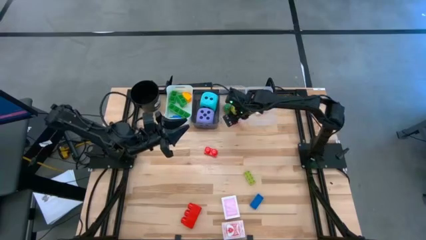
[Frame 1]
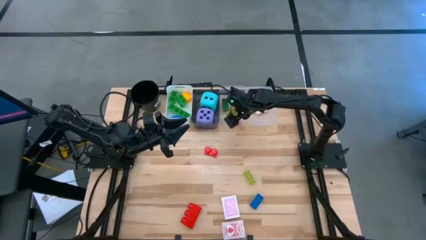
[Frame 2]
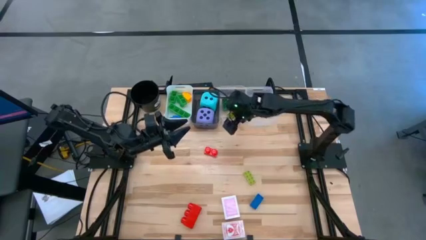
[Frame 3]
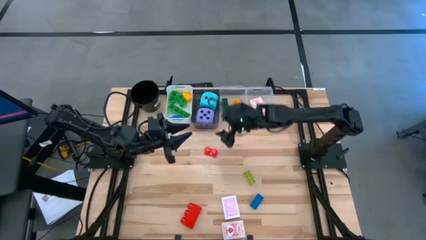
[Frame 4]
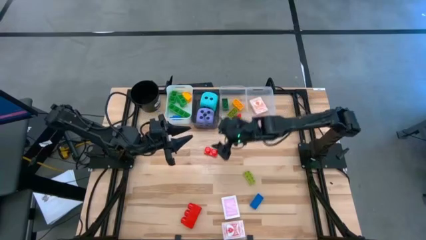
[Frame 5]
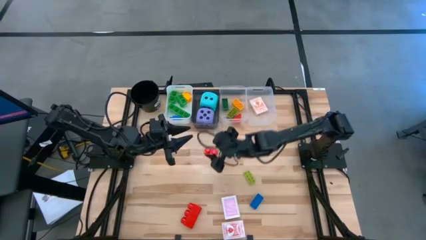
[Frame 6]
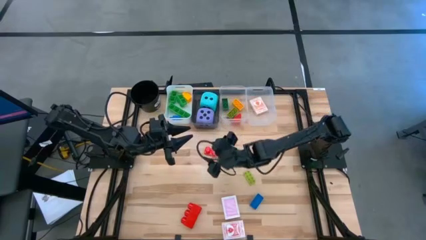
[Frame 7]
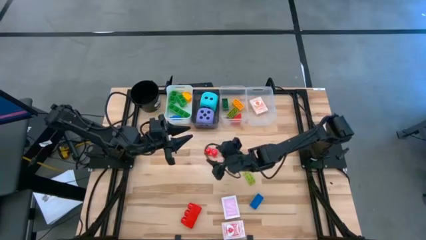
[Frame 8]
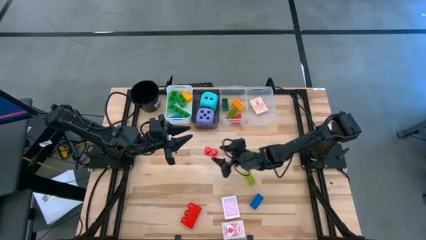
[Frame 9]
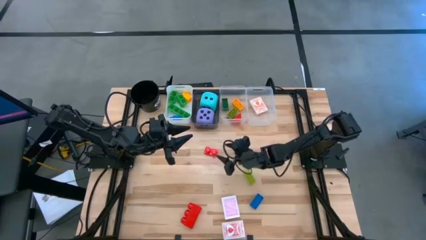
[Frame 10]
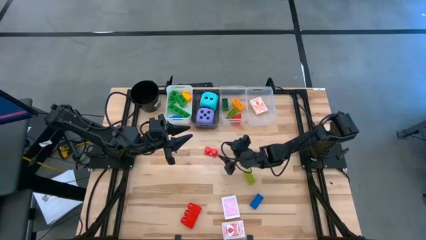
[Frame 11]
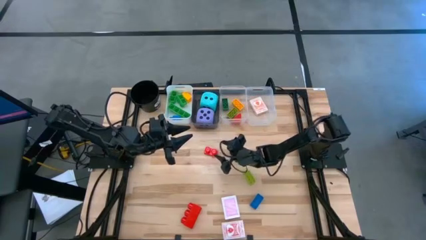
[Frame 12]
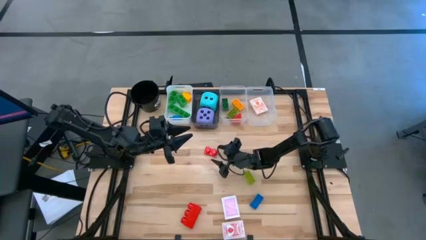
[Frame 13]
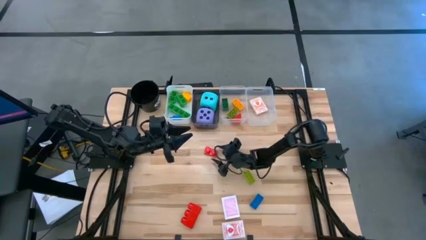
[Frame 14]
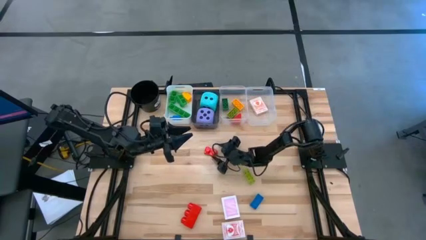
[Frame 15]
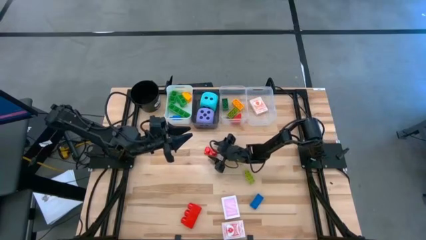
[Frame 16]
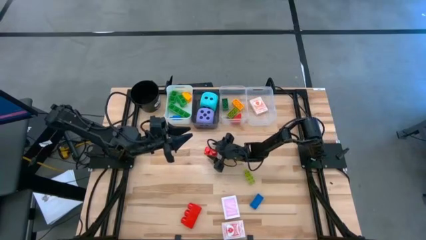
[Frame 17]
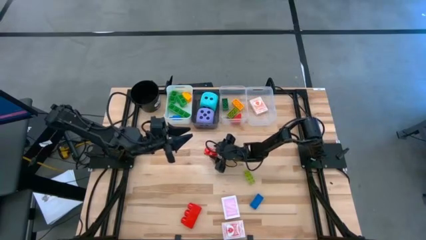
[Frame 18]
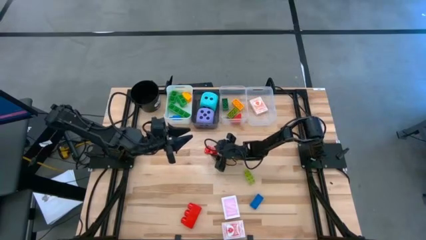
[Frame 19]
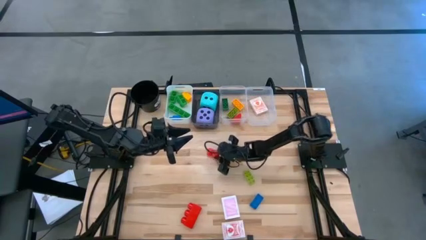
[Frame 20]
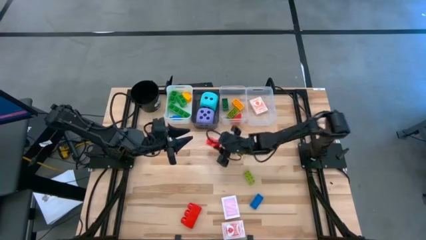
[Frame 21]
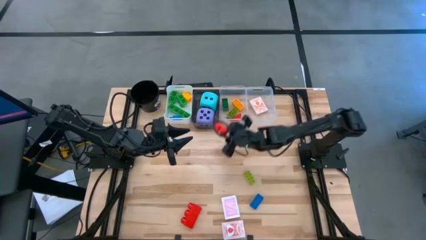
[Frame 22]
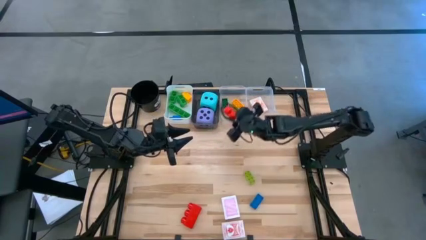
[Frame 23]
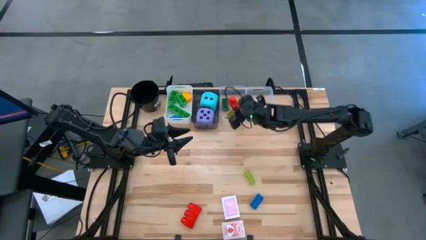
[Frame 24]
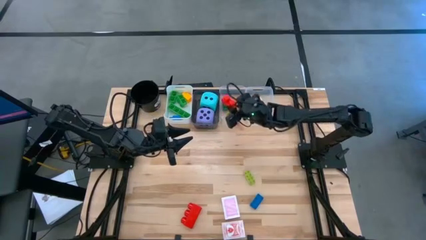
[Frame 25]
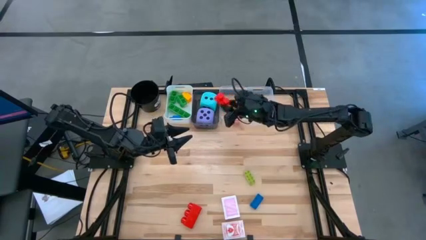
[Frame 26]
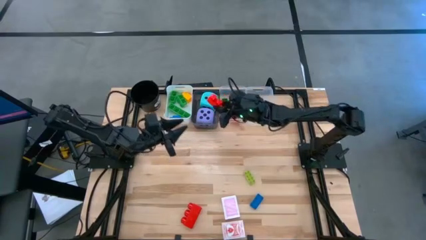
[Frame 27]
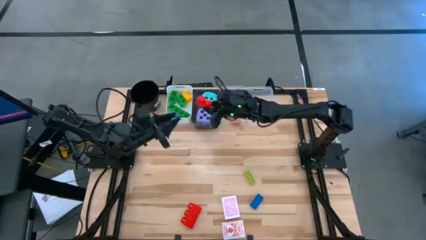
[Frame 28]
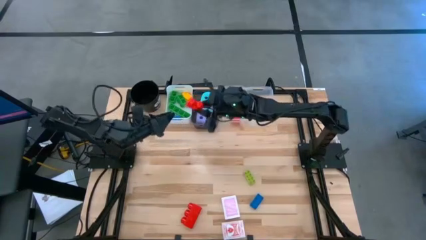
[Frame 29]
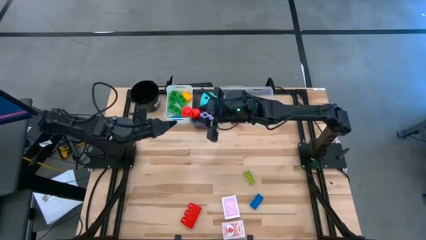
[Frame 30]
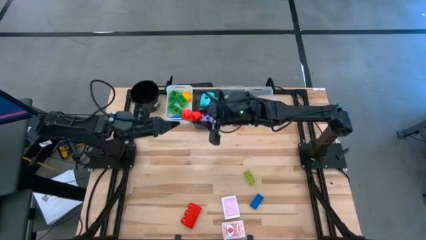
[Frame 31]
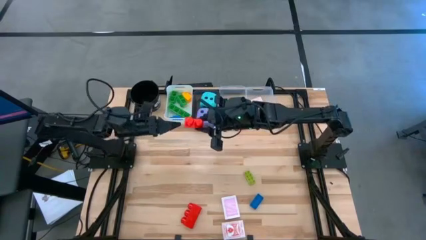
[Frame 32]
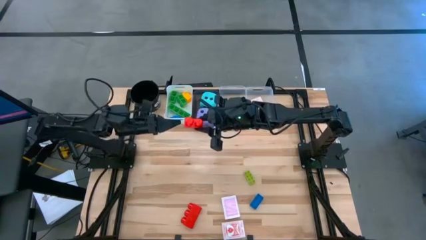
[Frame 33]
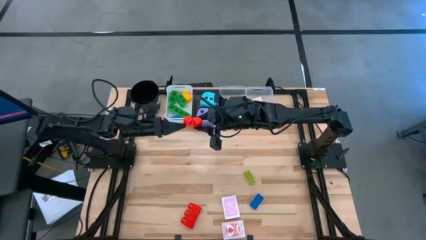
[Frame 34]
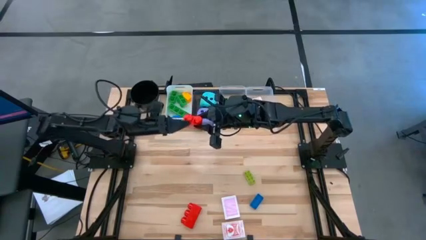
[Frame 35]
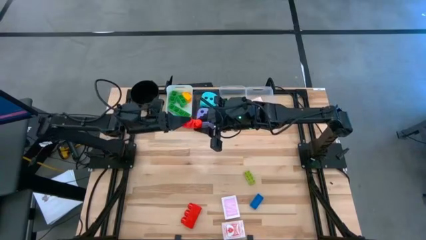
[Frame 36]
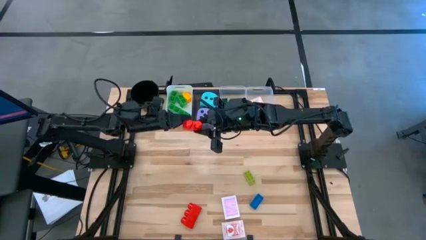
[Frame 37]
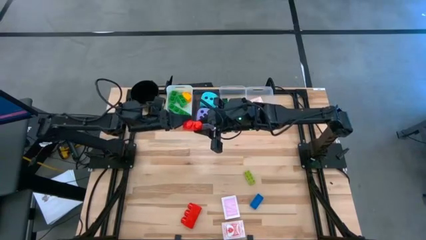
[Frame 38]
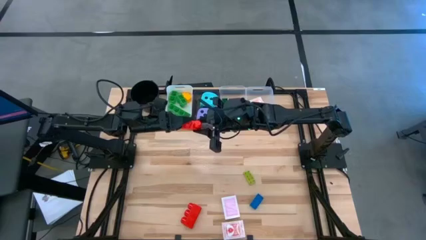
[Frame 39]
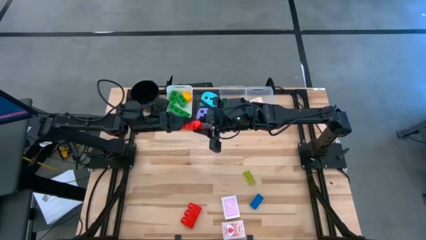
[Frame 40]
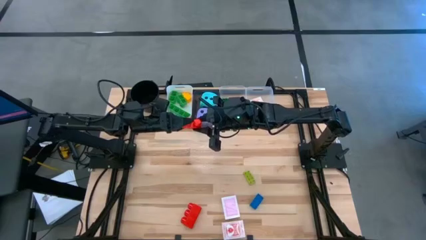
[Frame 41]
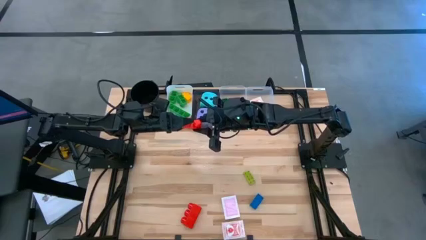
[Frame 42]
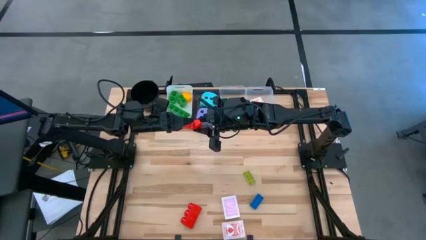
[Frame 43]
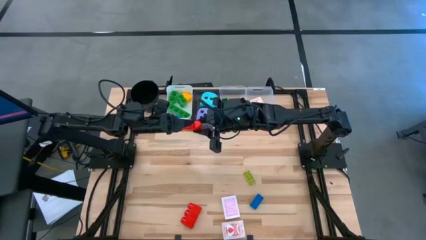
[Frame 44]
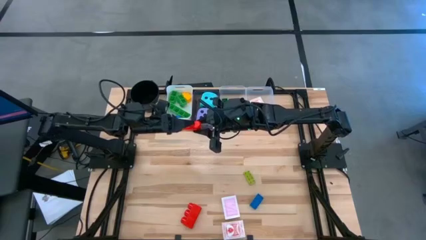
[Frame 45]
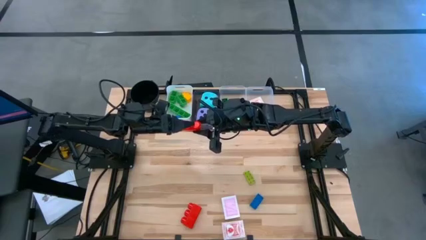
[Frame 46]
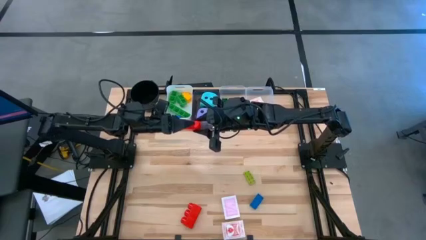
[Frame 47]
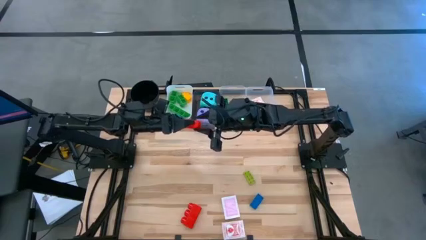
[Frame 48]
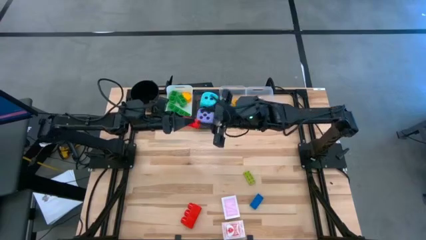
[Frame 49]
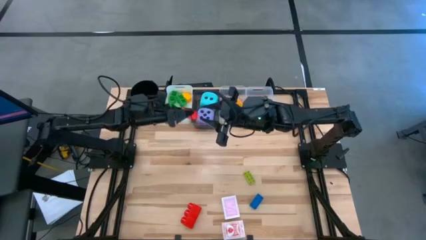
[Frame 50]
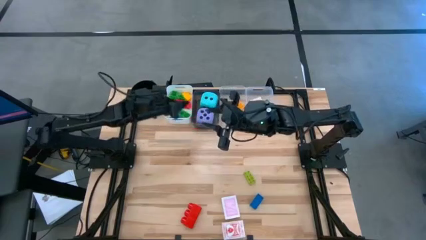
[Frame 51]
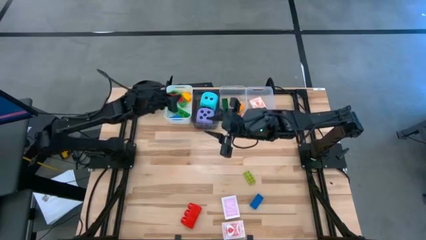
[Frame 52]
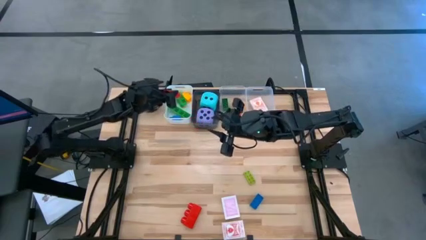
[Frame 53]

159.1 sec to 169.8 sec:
Task: Pick & Place Toys
Put the big red 2-stud game piece into the white bin

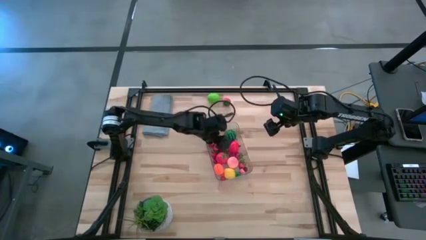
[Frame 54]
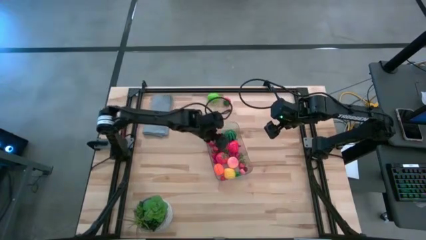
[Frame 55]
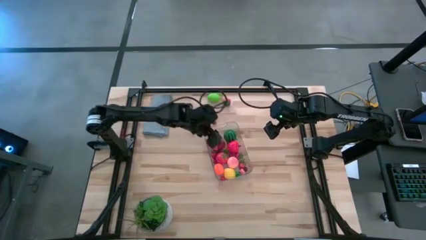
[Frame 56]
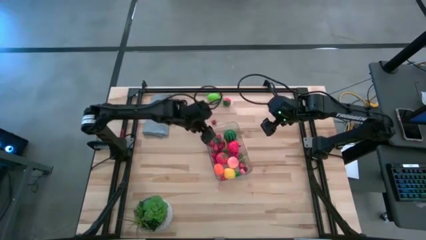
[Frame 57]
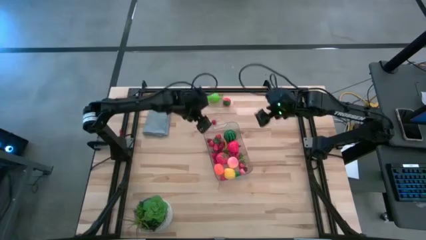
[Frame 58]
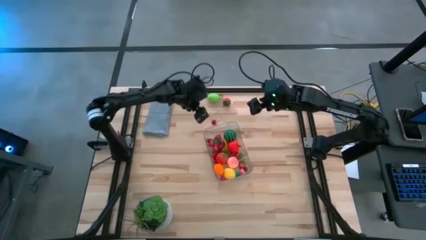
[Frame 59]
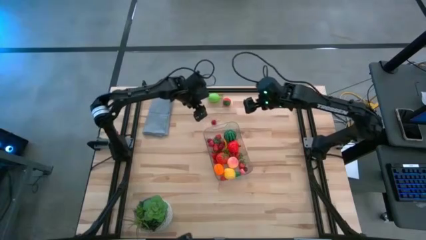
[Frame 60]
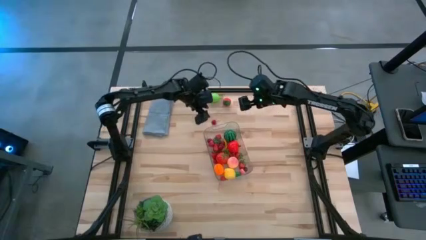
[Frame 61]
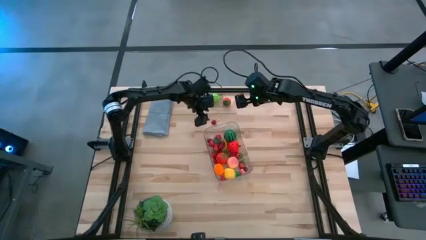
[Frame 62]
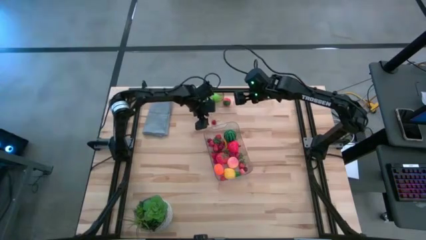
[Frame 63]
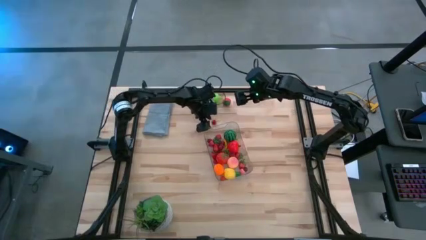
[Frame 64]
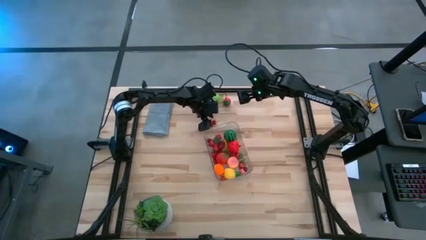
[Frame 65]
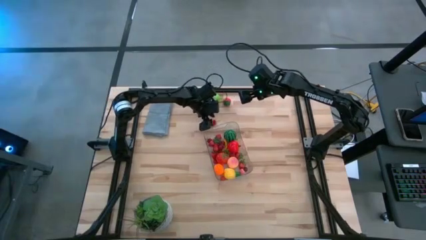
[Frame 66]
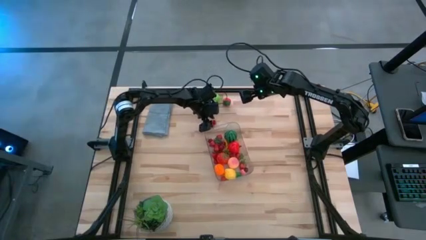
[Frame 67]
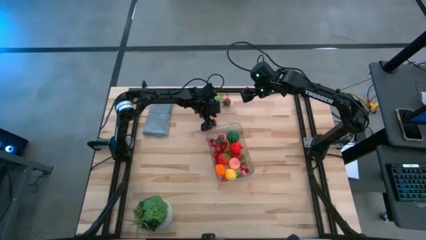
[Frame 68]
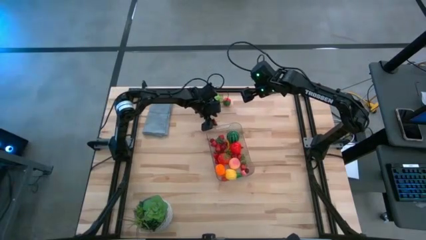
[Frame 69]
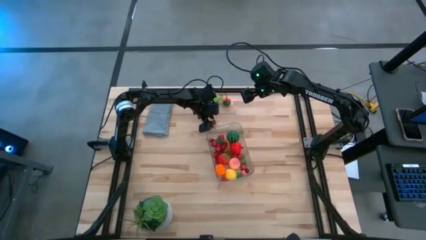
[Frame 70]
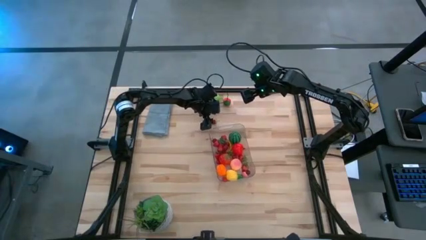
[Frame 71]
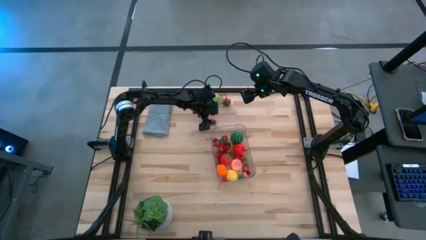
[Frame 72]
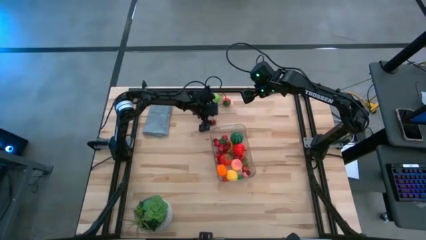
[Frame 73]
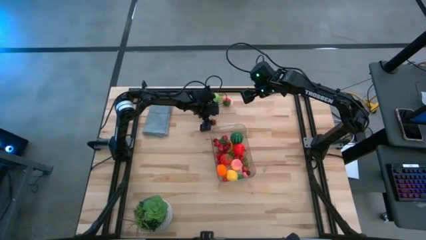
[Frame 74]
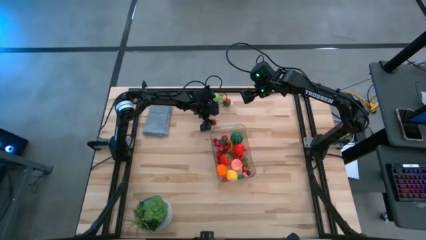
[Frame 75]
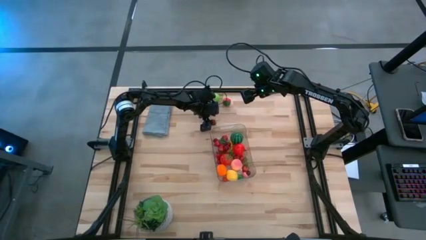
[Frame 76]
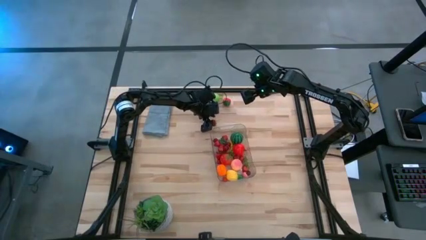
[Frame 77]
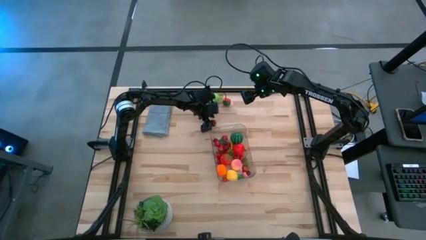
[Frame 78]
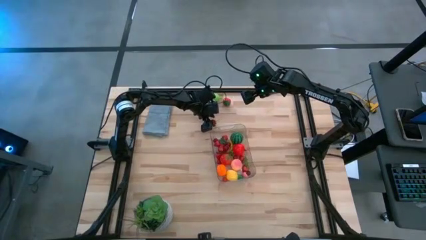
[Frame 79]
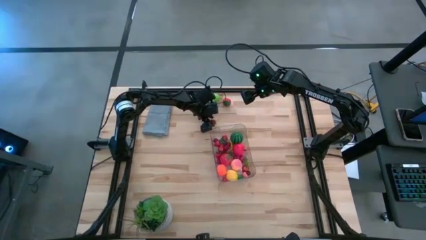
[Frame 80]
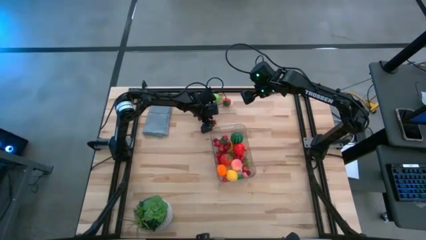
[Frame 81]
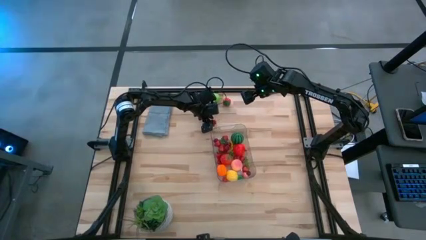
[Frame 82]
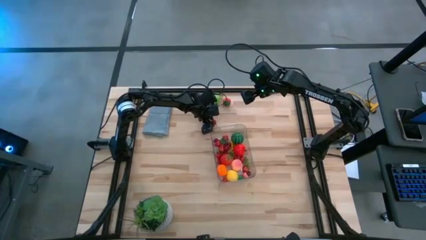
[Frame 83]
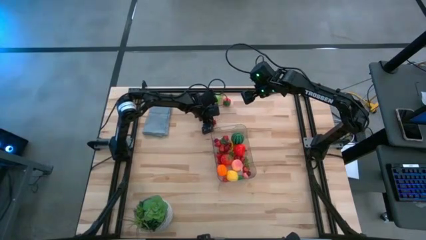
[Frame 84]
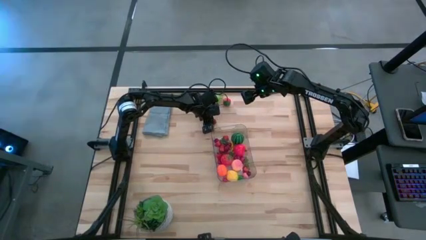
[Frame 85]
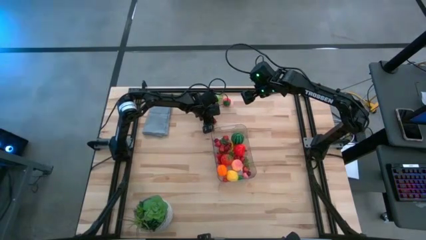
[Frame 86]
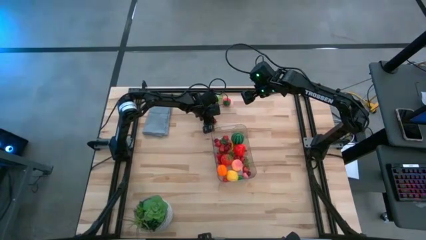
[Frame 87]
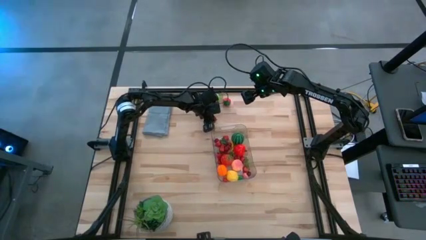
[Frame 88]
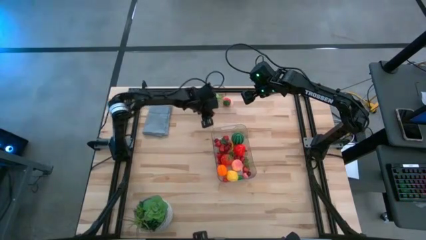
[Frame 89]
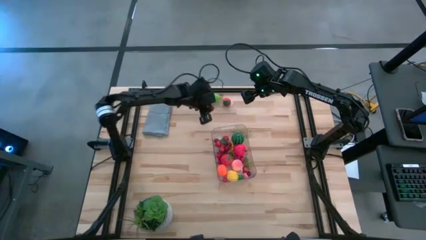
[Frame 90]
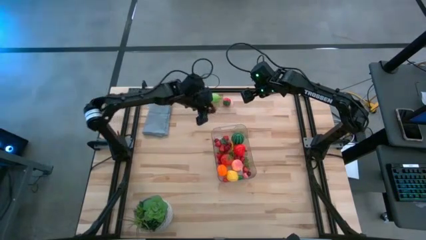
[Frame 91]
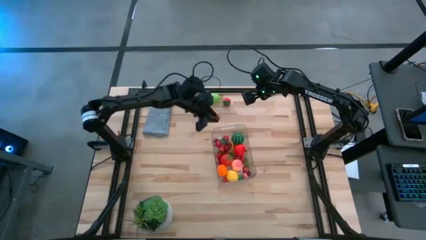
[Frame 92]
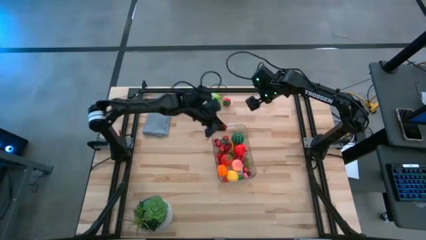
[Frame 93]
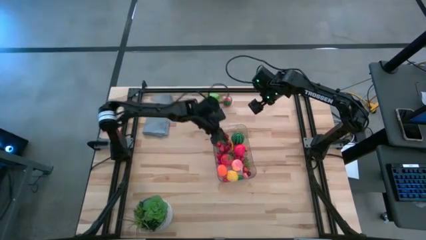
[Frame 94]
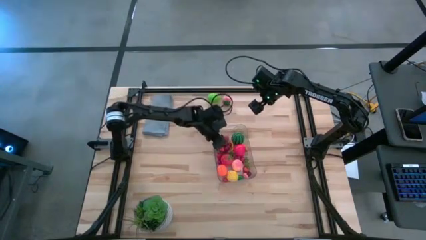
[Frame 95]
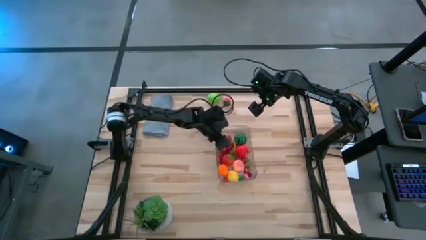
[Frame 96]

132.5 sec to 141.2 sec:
Task: Pick and placing Produce into tupperware
Put the red raspberry into the transparent bin
